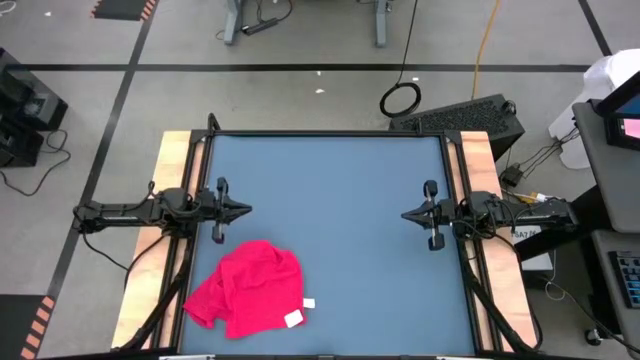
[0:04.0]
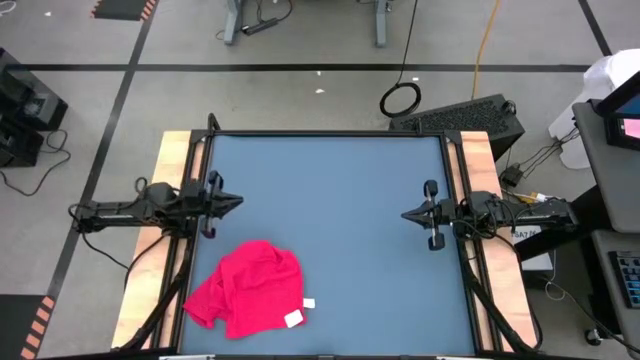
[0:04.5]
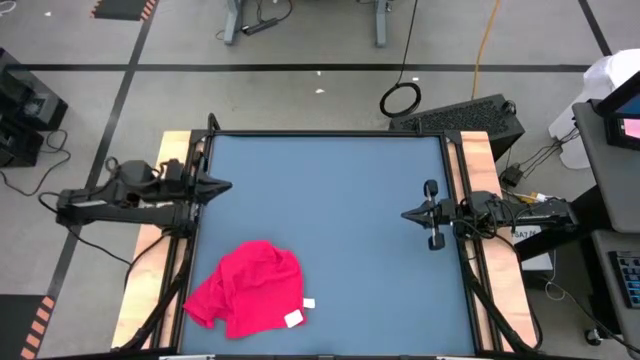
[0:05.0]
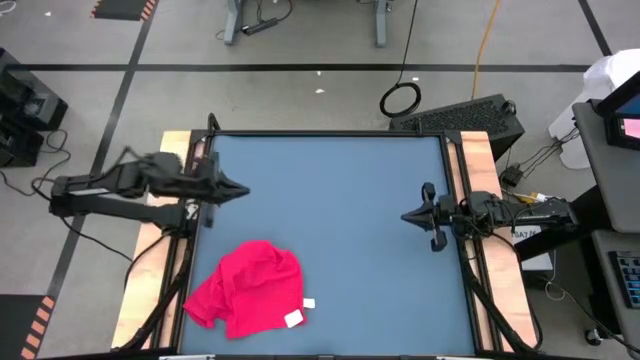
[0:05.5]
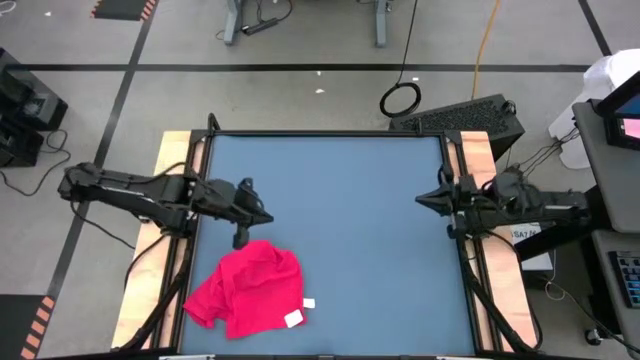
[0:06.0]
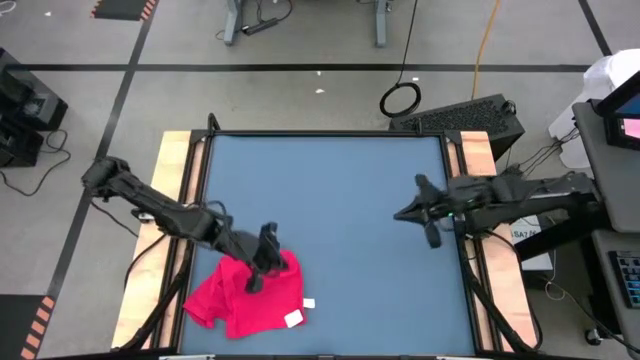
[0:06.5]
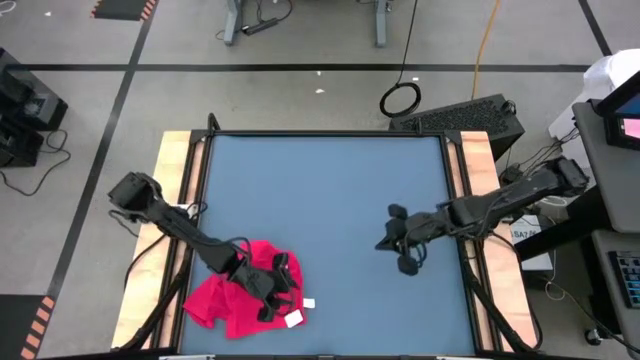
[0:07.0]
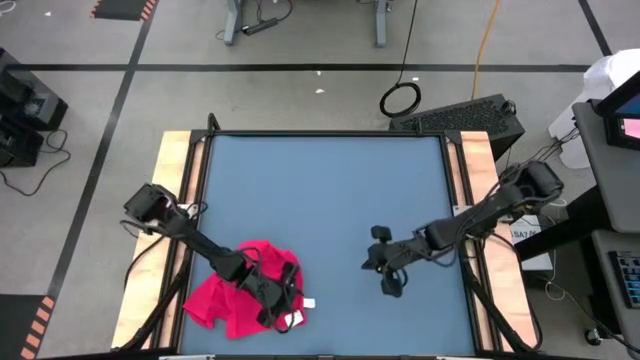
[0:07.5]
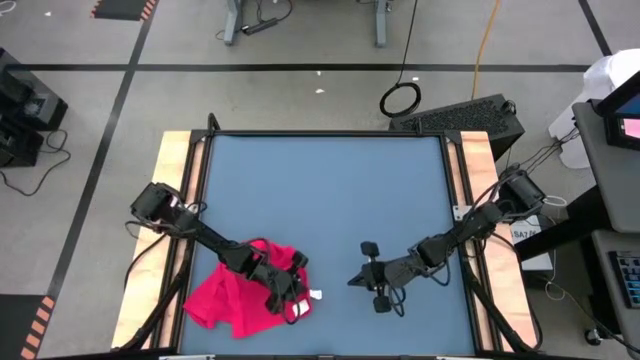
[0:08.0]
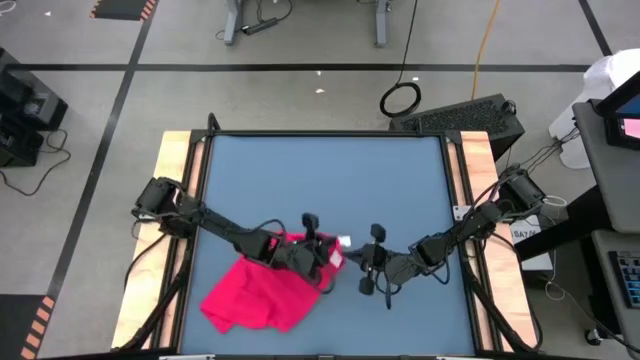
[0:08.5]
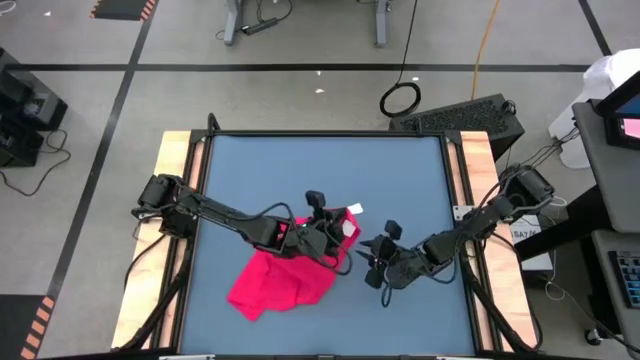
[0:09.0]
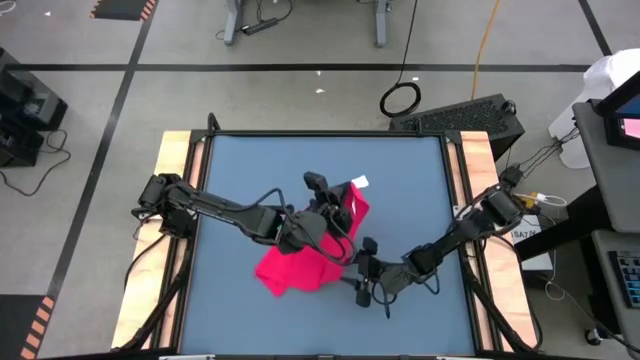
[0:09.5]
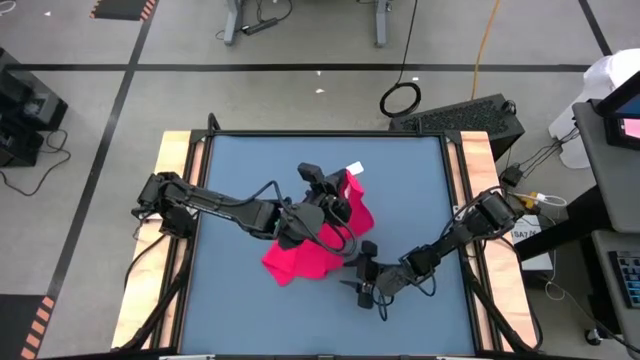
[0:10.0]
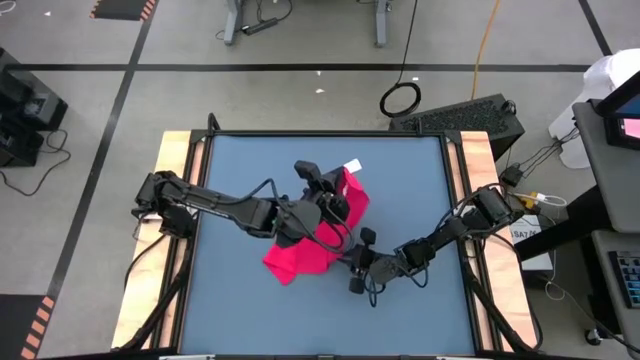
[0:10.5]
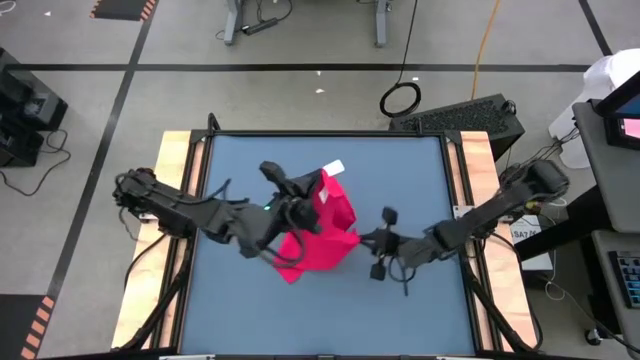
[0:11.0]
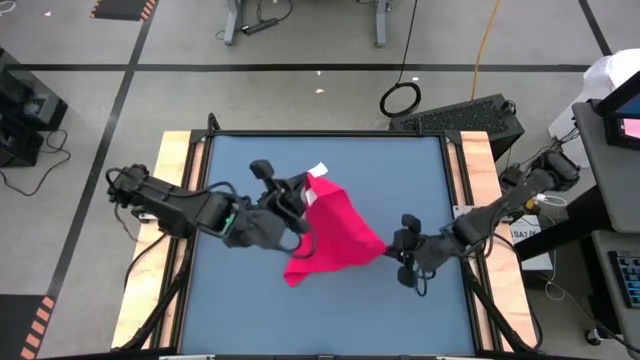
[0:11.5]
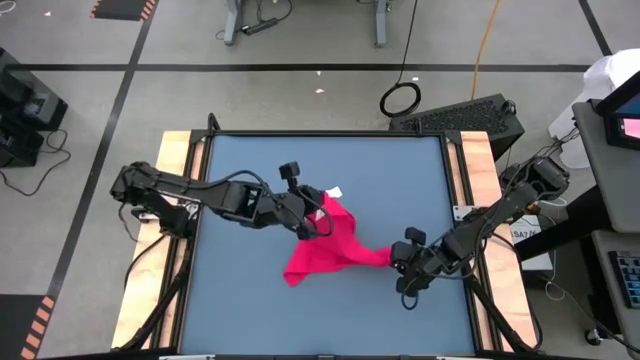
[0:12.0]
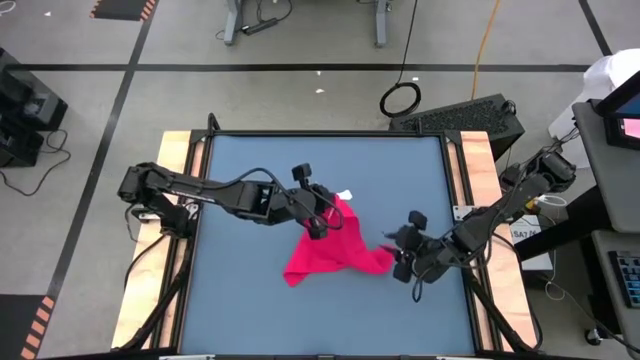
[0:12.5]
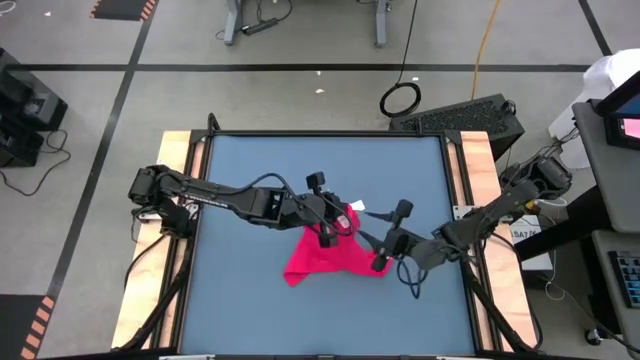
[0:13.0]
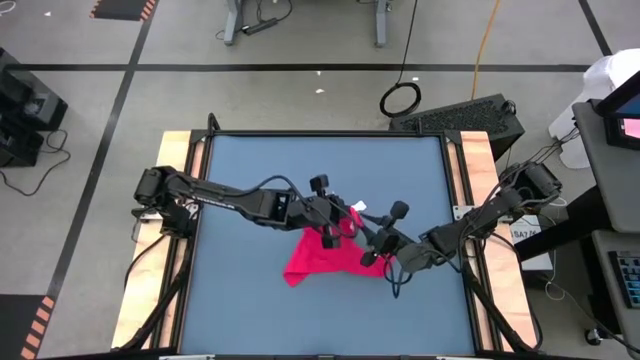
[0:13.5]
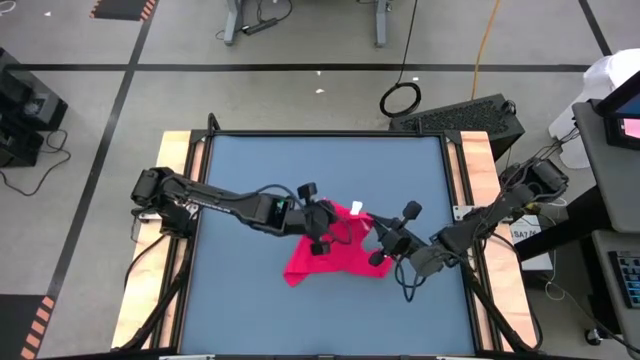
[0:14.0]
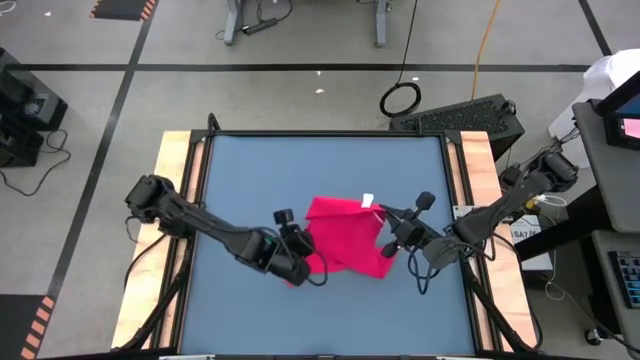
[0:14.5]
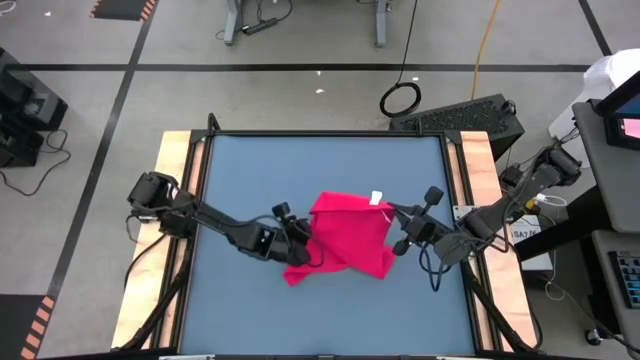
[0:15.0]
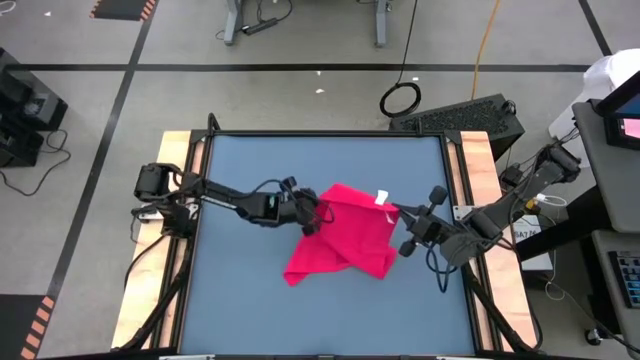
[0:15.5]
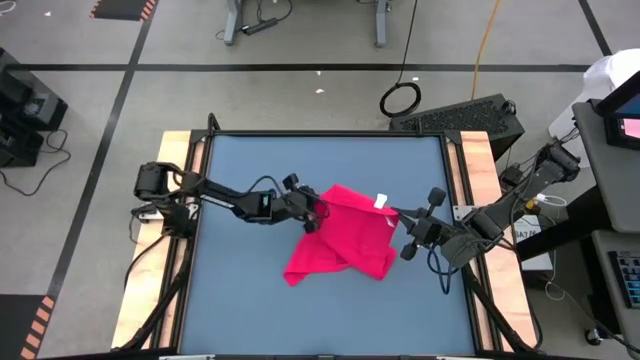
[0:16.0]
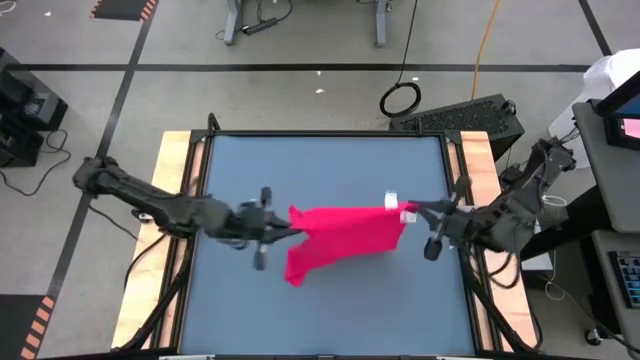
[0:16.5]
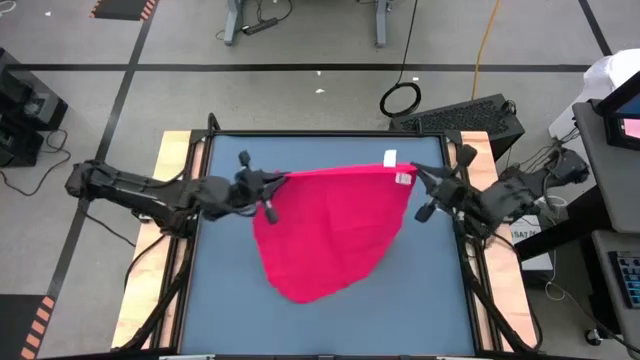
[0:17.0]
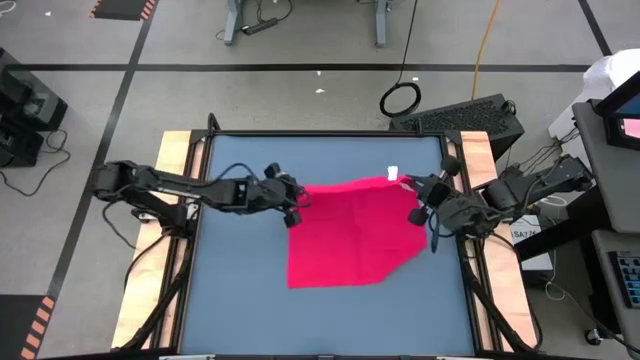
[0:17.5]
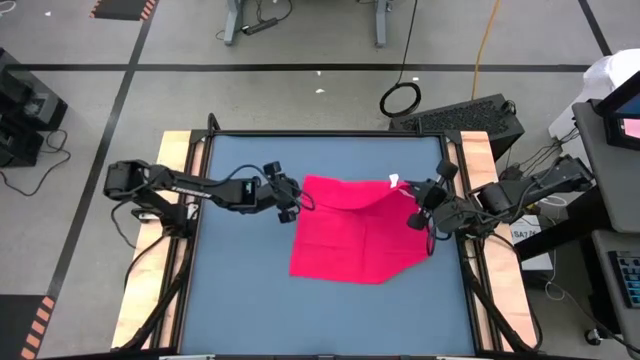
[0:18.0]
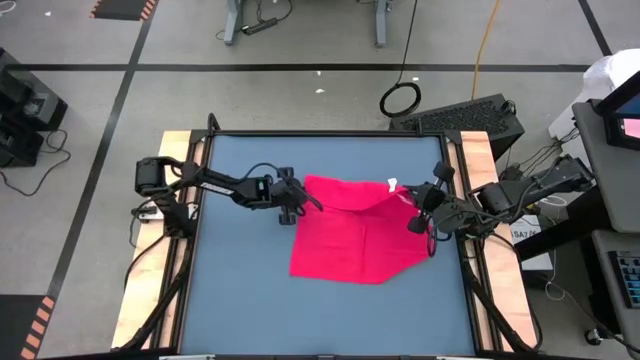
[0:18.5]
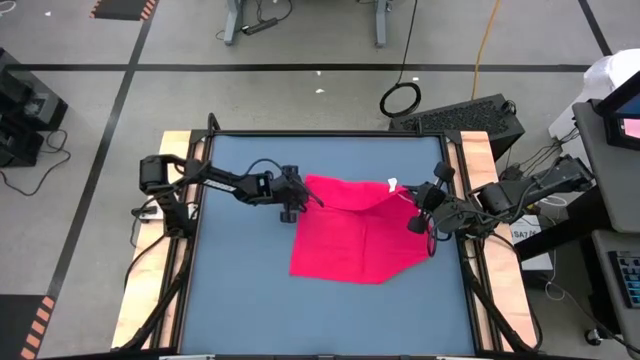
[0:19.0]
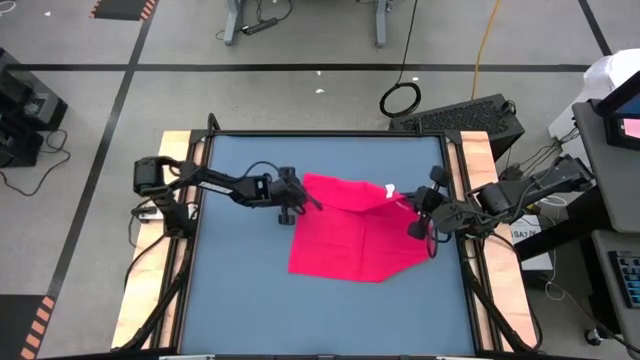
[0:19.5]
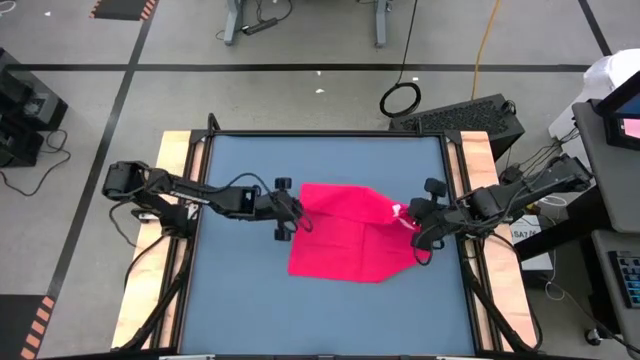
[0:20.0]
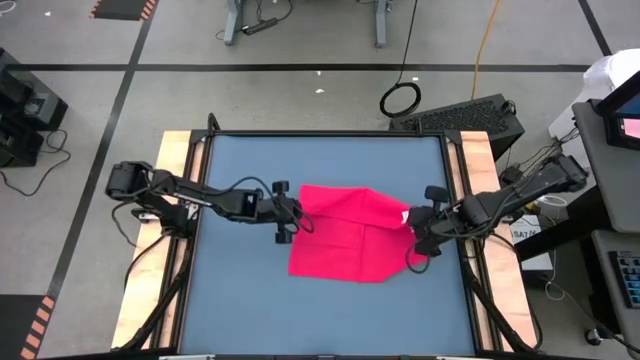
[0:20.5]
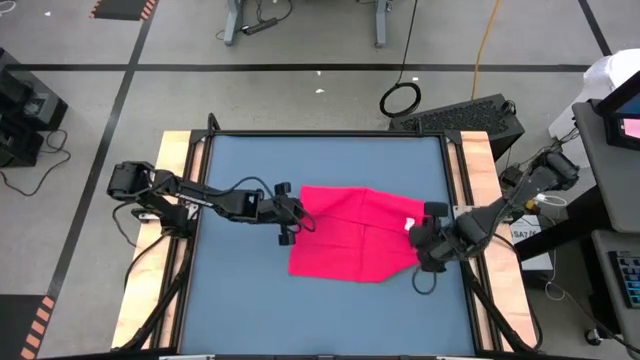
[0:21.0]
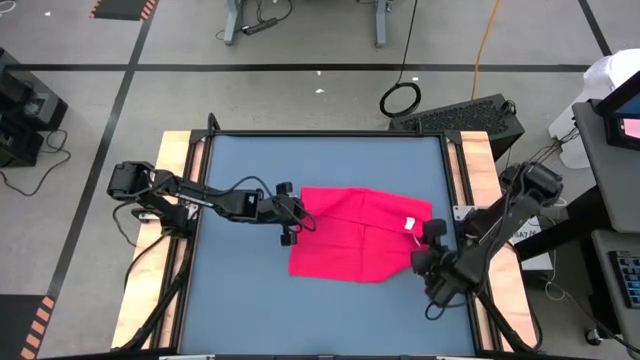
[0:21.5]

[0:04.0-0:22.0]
Task: Roll towel
Fold the red towel

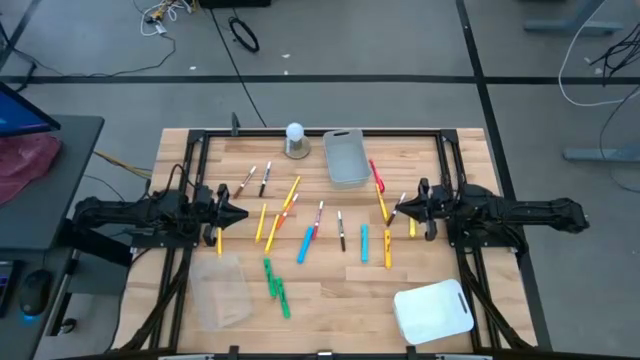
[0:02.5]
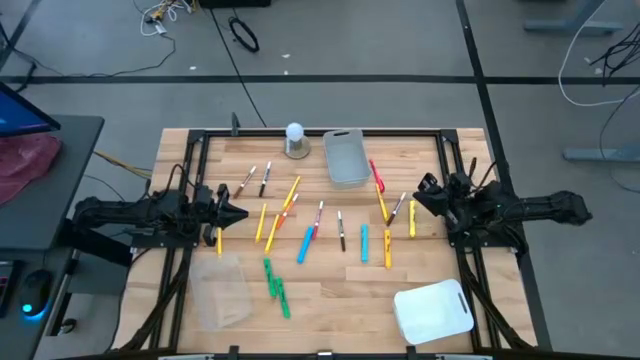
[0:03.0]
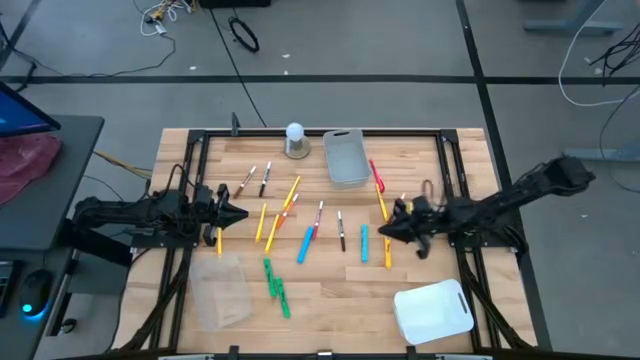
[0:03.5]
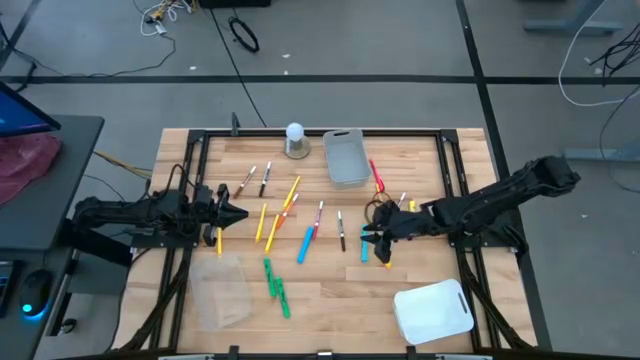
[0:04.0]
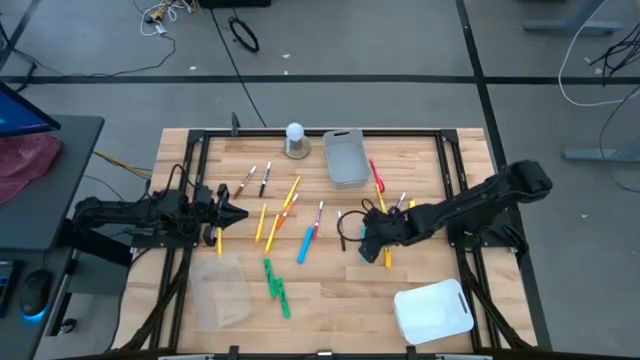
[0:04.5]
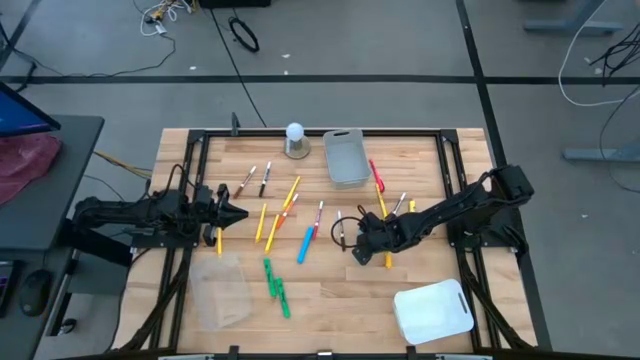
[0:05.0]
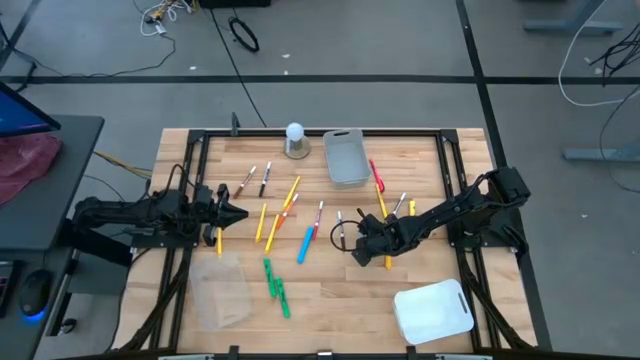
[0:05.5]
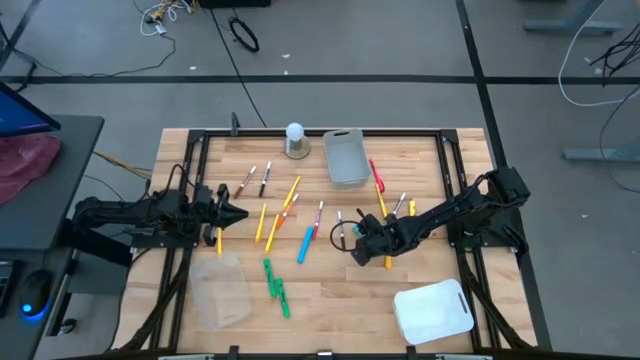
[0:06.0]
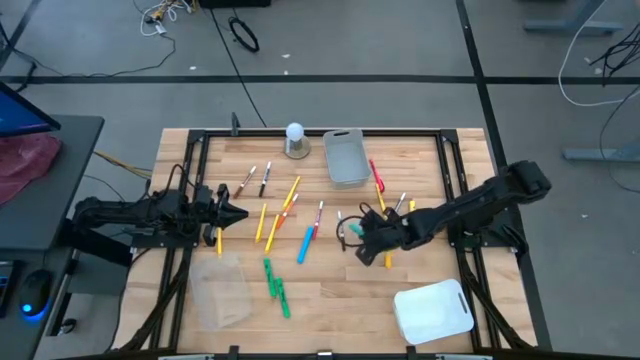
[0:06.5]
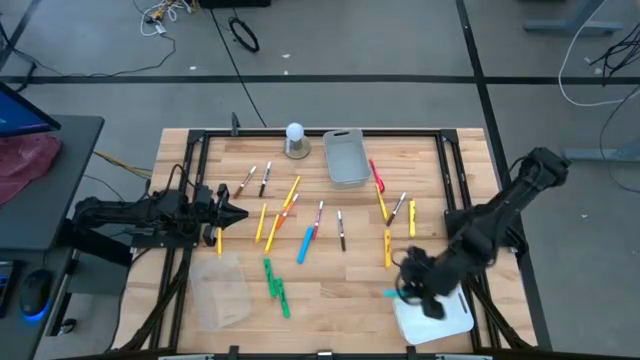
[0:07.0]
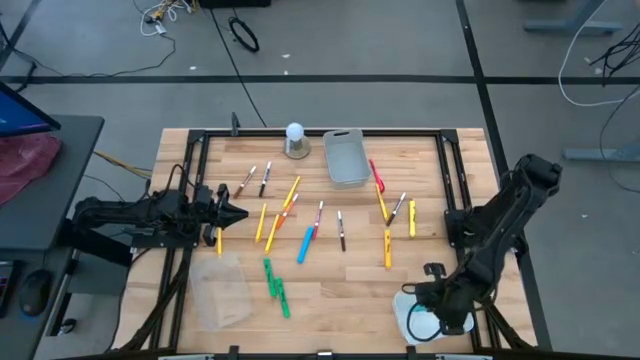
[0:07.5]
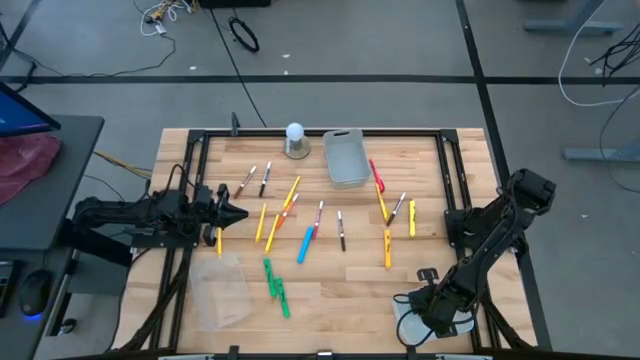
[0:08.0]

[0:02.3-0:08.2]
Task: Pick & Place Markers
Put the light blue highlighter pen into the white bin
